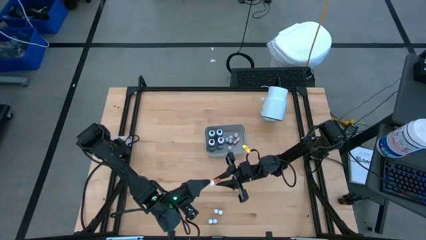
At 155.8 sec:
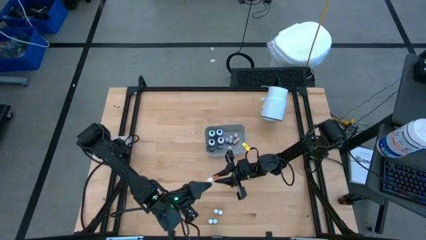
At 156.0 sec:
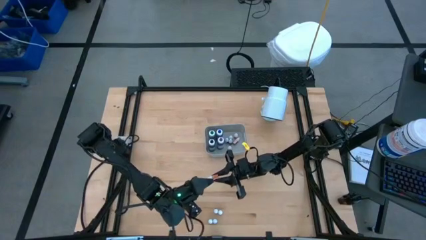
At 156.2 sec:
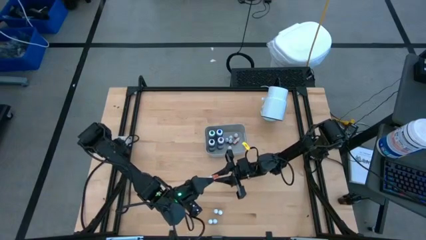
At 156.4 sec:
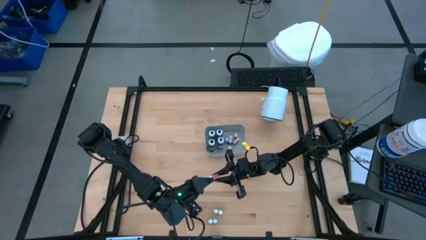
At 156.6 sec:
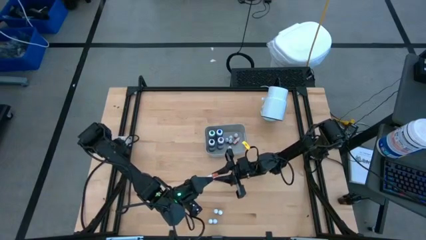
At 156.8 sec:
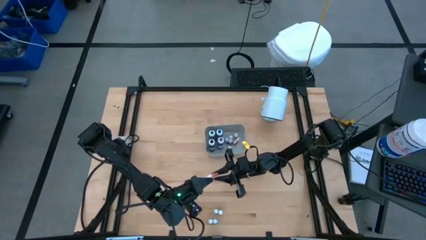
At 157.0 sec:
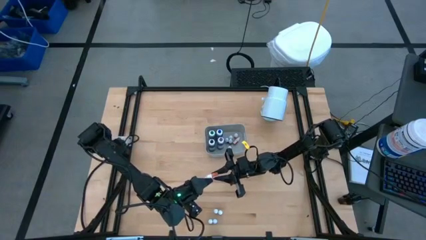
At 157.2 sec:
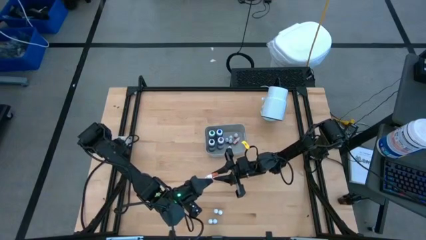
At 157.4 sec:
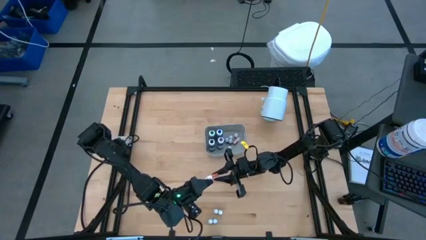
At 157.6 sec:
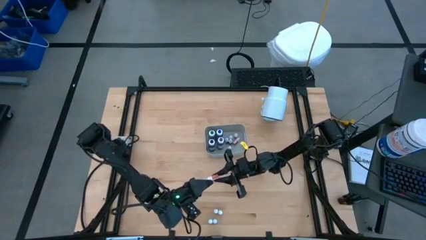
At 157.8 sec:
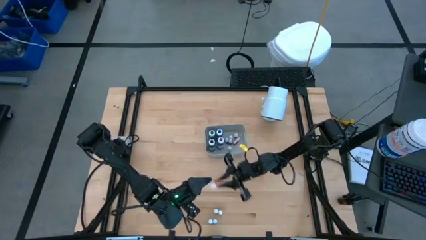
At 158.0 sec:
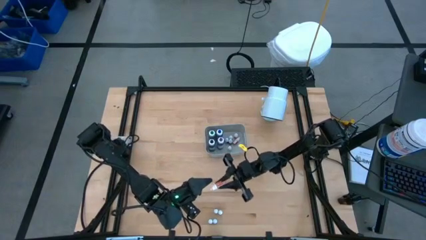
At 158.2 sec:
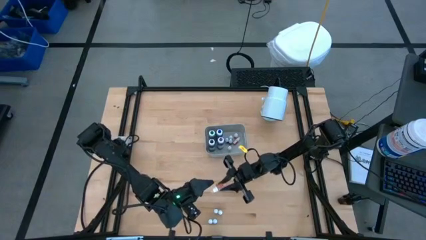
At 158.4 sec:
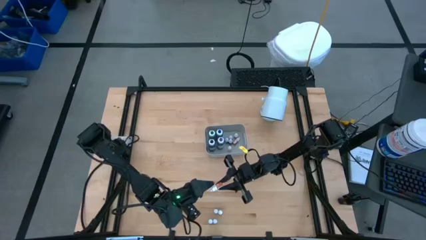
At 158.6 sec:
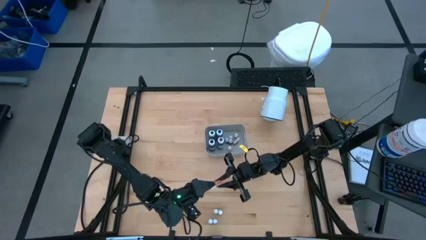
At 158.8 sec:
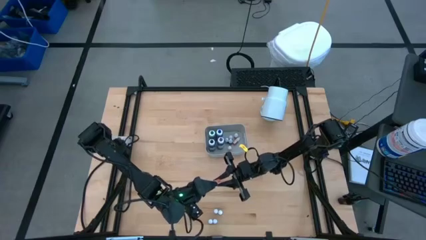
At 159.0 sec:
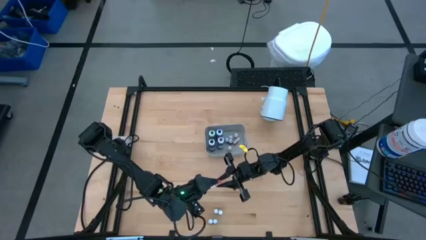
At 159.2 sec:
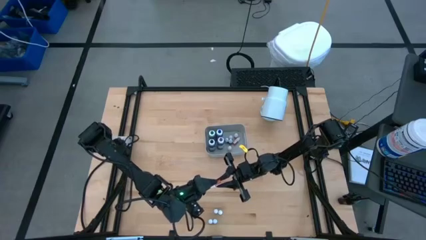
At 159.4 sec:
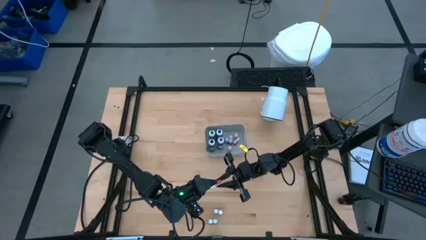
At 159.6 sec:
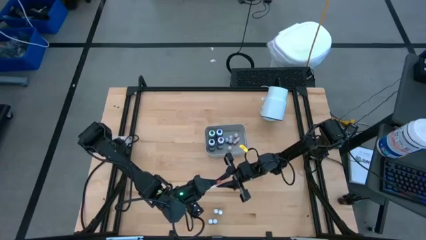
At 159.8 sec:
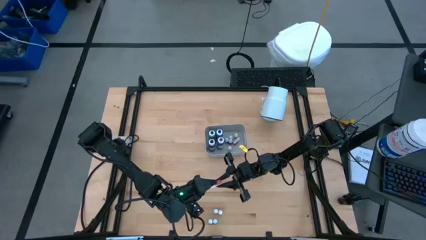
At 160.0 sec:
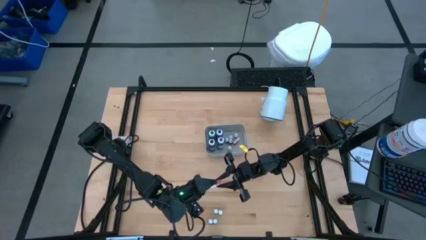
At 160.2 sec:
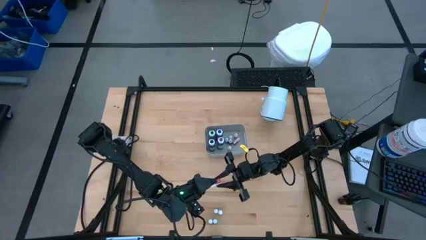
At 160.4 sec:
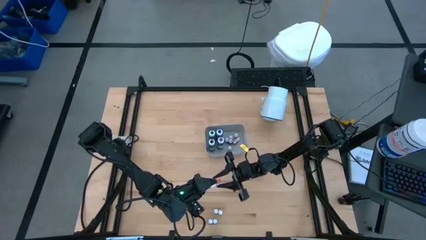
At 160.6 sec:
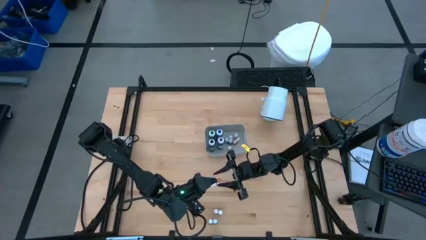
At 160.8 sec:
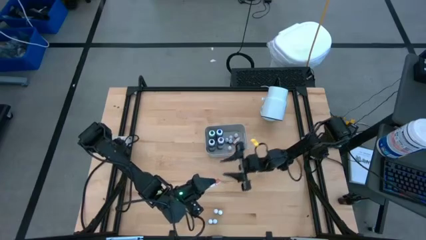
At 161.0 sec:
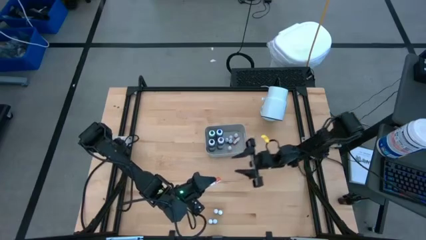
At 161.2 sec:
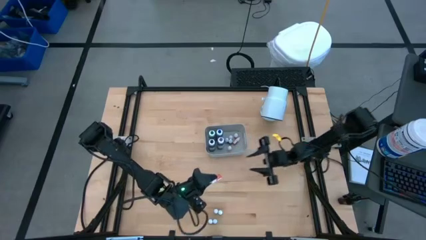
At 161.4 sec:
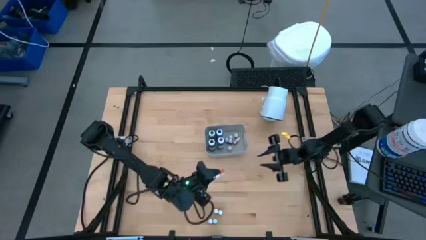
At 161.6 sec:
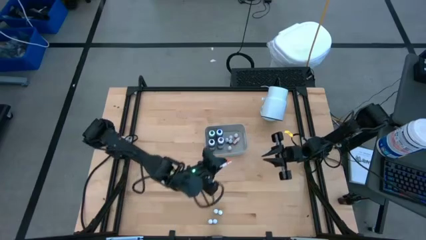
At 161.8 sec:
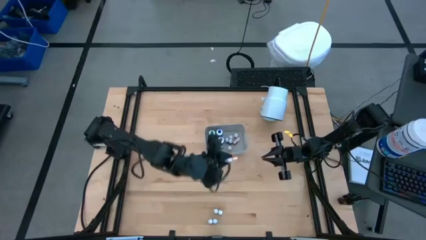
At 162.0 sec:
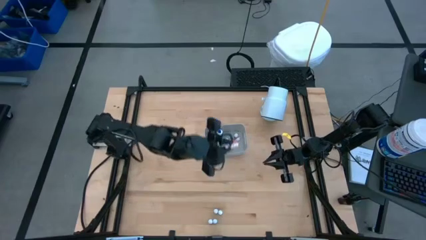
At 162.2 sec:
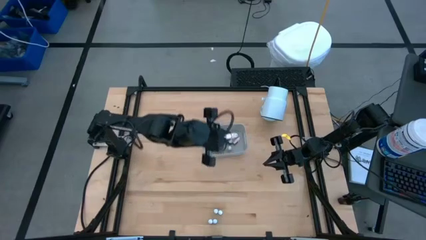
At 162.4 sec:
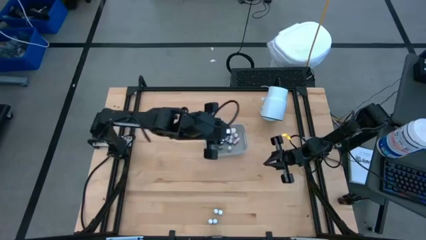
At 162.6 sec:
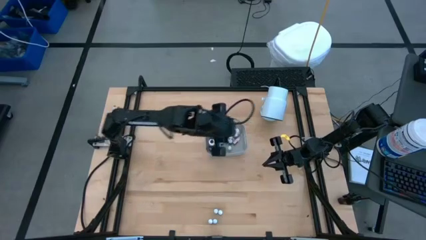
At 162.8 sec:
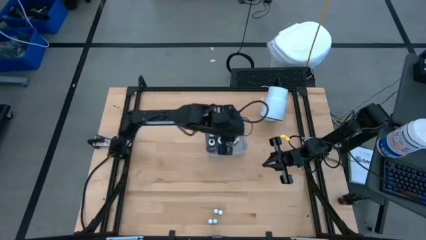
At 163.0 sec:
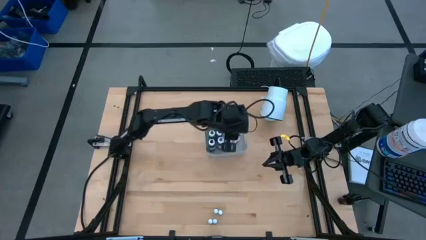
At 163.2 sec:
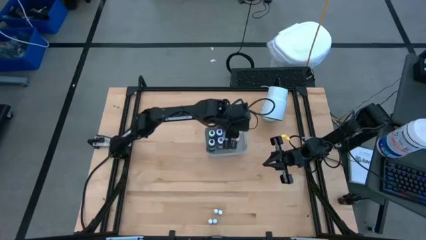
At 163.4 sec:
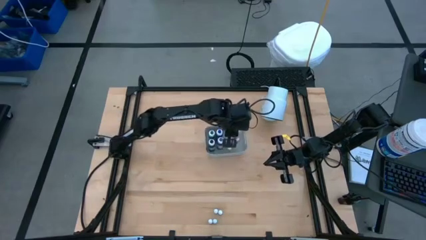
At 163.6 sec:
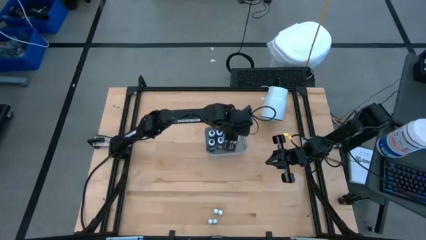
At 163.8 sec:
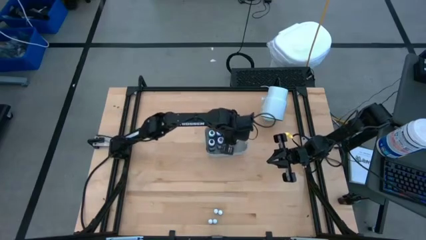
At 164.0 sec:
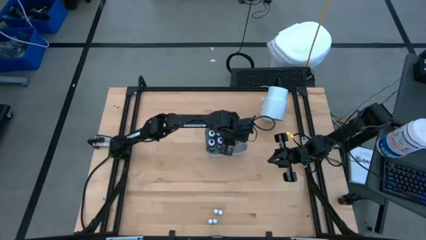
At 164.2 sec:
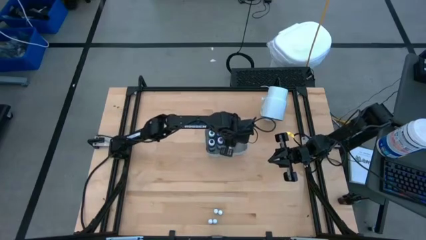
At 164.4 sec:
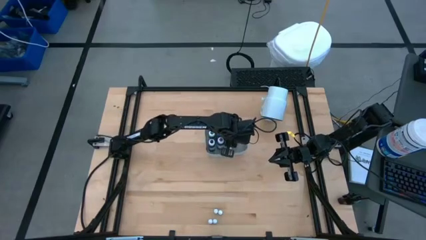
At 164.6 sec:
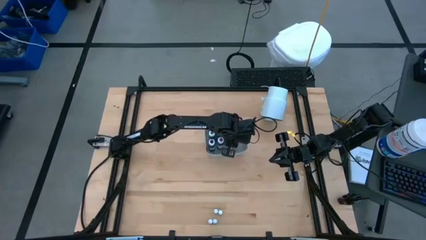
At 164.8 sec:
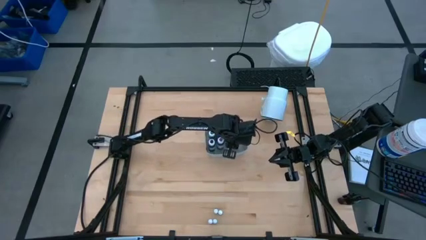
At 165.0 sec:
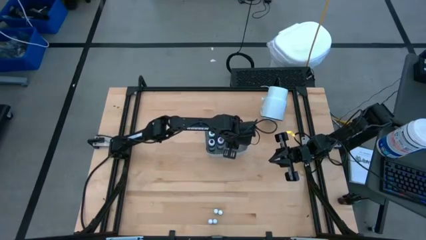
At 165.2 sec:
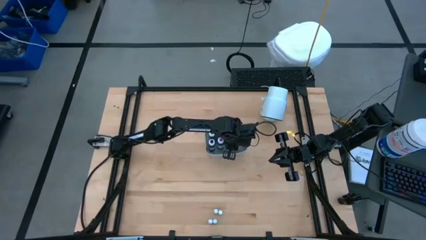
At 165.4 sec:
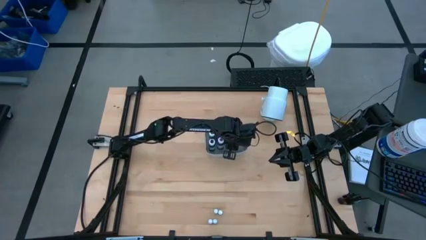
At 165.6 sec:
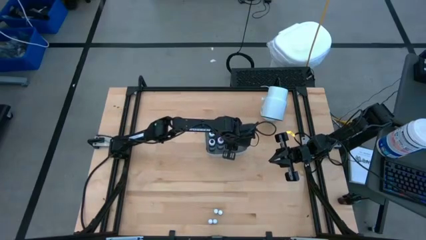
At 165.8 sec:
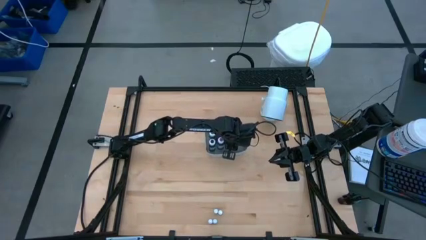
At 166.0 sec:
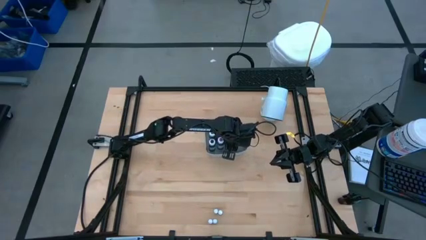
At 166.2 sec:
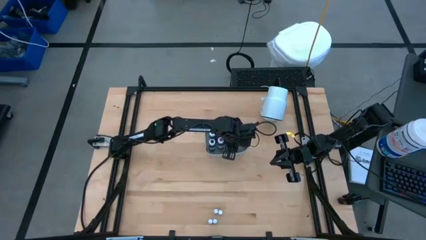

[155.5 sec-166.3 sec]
Task: Pick & Place food coloring
Put the small yellow food coloring bottle into the gray bin
